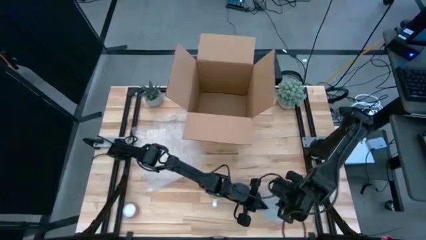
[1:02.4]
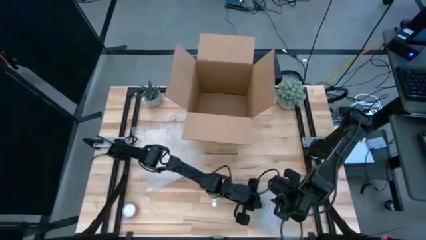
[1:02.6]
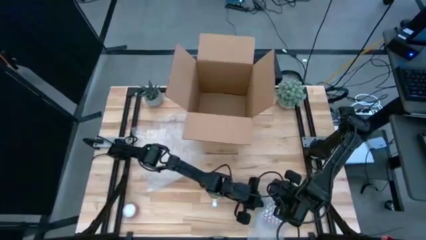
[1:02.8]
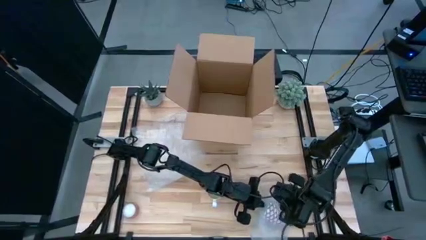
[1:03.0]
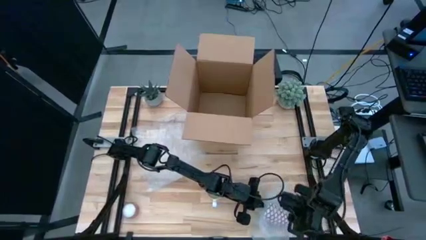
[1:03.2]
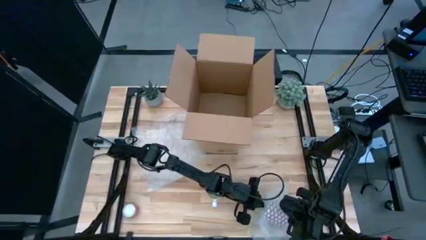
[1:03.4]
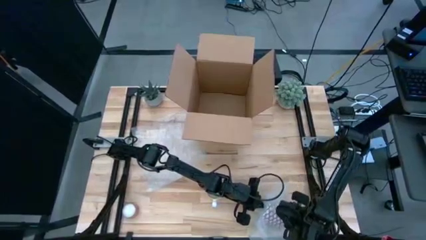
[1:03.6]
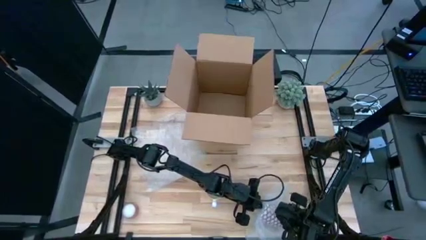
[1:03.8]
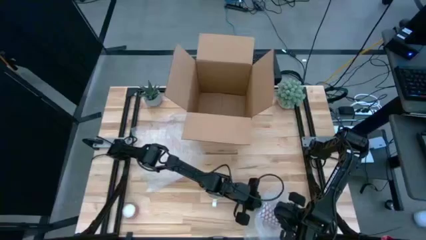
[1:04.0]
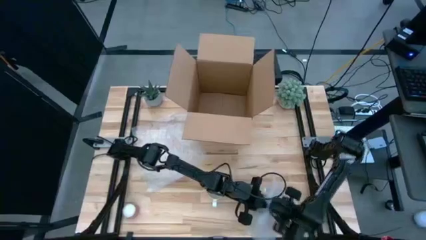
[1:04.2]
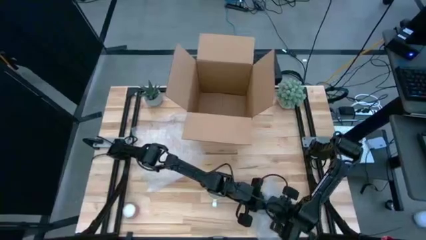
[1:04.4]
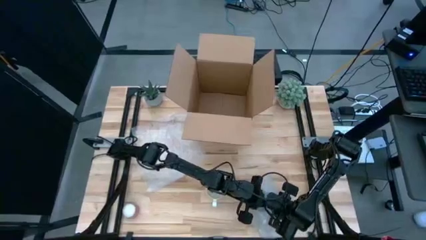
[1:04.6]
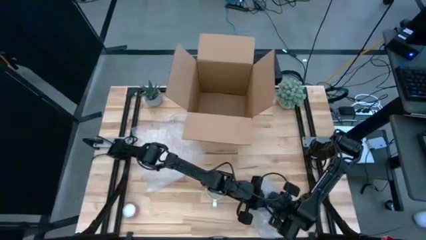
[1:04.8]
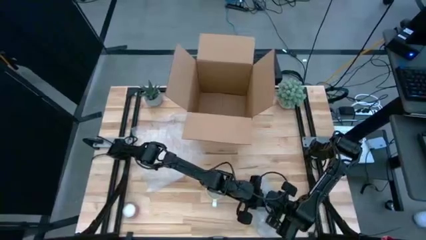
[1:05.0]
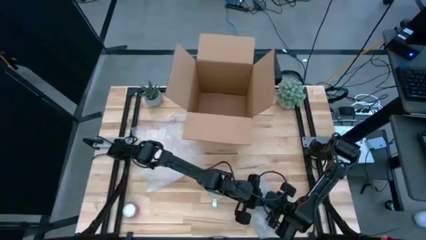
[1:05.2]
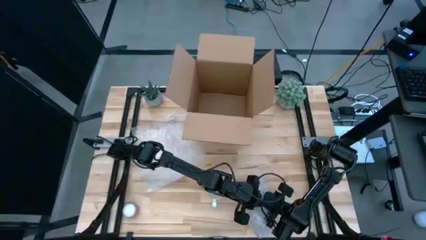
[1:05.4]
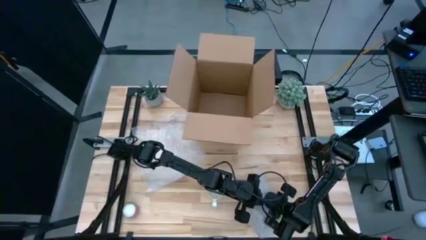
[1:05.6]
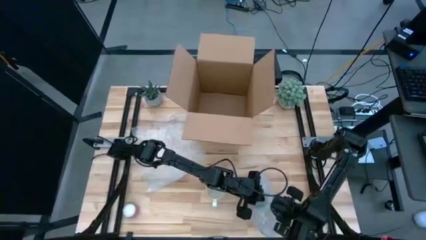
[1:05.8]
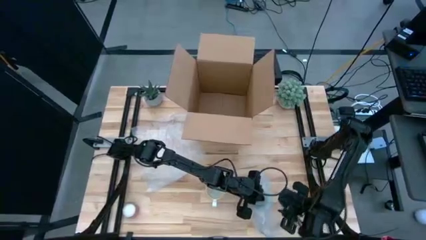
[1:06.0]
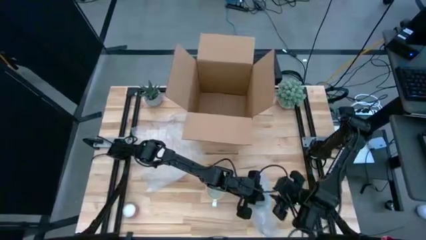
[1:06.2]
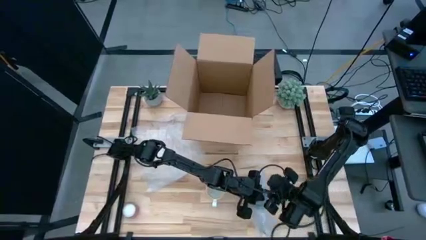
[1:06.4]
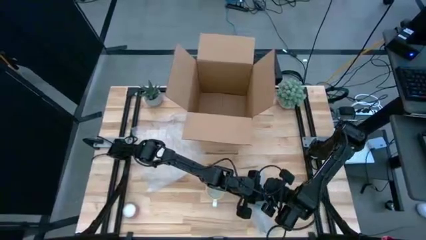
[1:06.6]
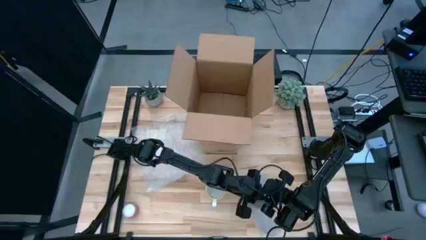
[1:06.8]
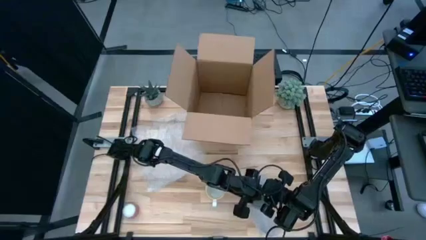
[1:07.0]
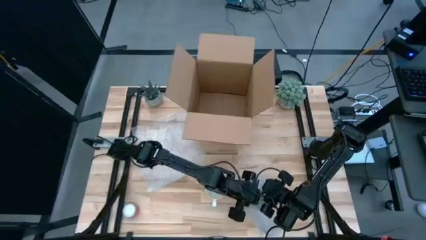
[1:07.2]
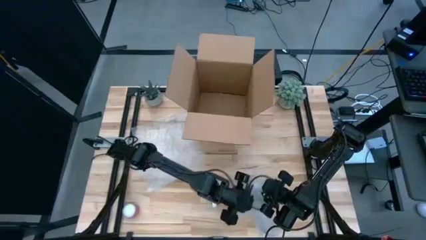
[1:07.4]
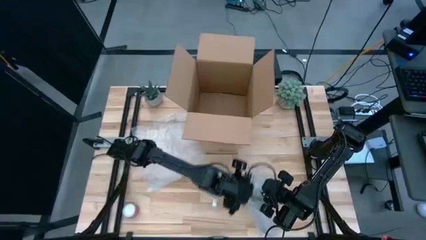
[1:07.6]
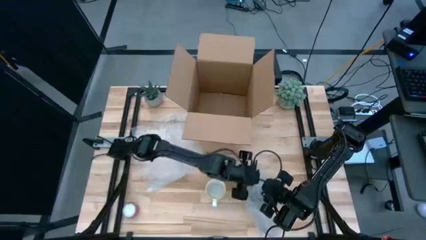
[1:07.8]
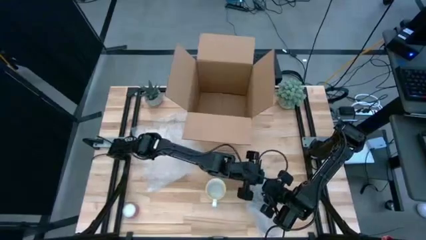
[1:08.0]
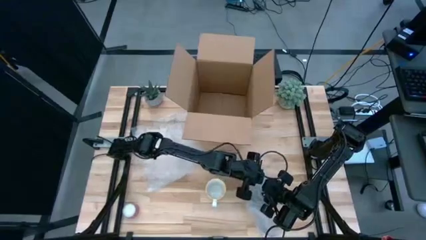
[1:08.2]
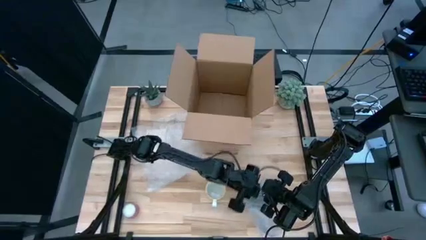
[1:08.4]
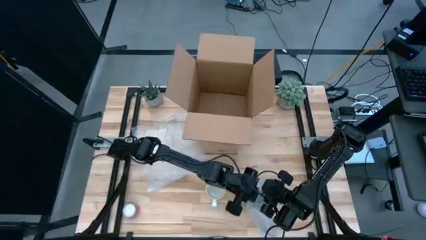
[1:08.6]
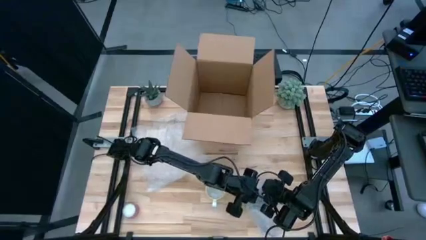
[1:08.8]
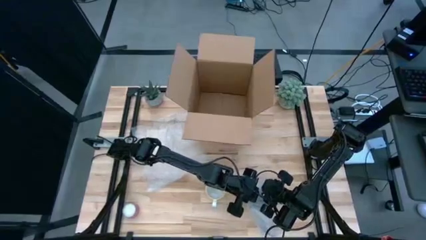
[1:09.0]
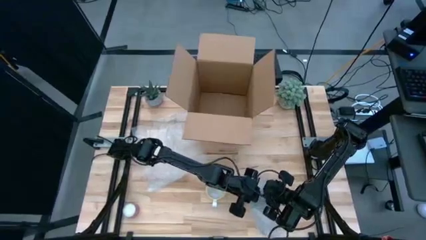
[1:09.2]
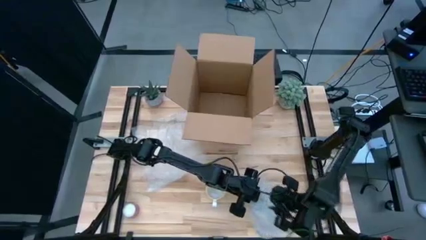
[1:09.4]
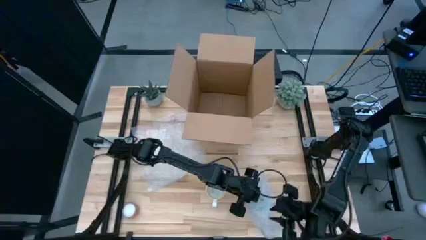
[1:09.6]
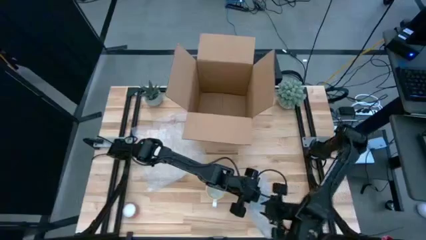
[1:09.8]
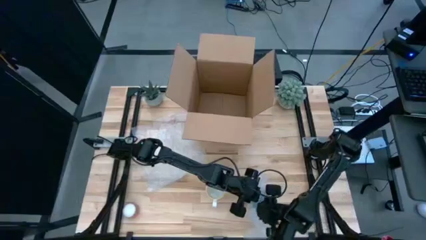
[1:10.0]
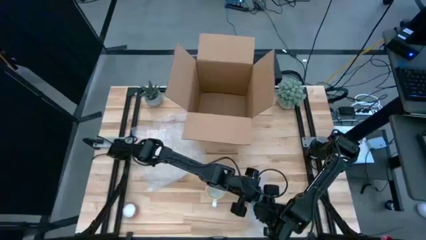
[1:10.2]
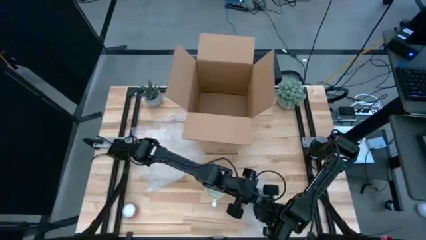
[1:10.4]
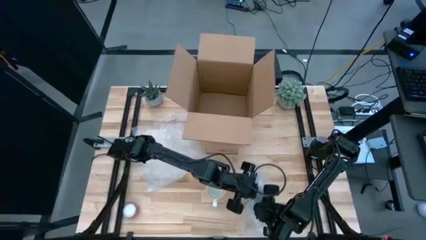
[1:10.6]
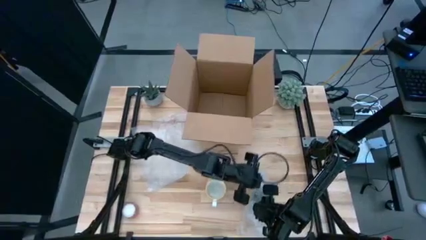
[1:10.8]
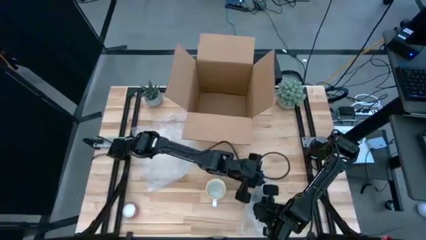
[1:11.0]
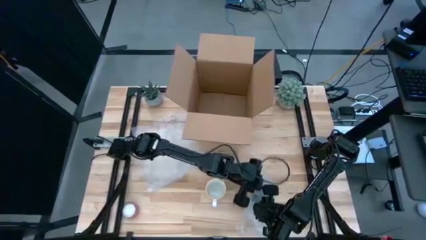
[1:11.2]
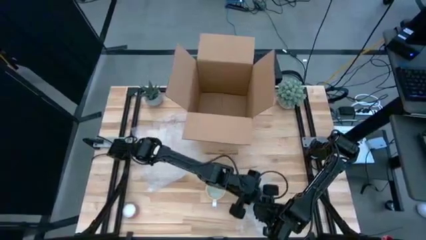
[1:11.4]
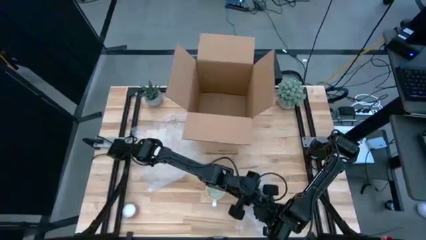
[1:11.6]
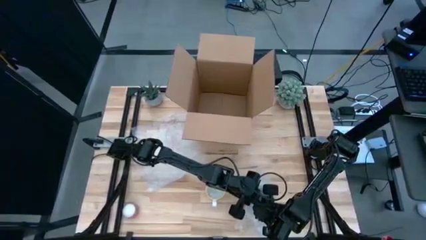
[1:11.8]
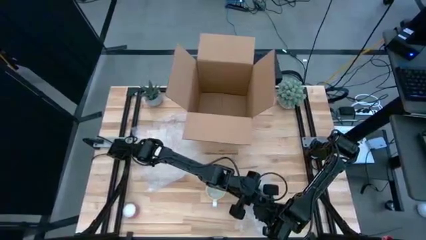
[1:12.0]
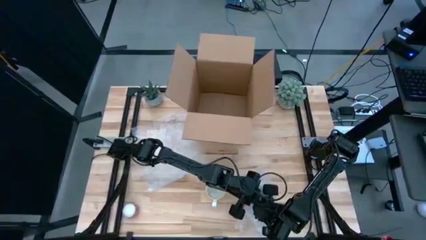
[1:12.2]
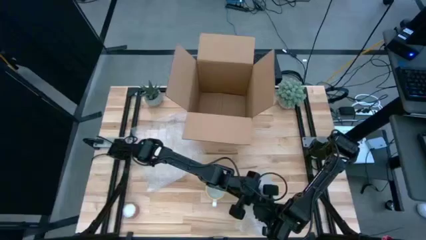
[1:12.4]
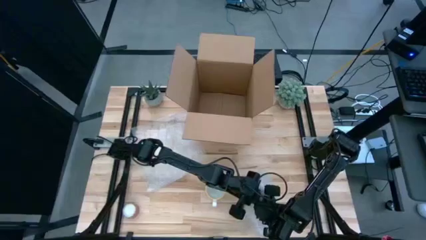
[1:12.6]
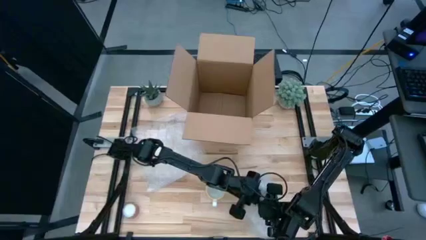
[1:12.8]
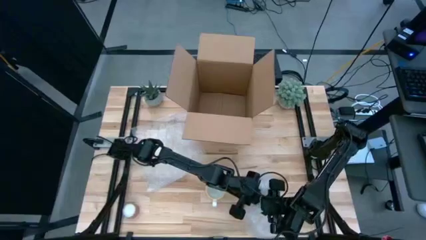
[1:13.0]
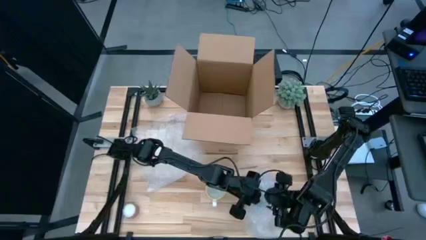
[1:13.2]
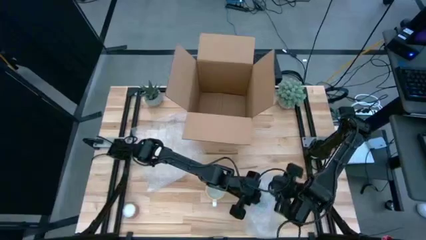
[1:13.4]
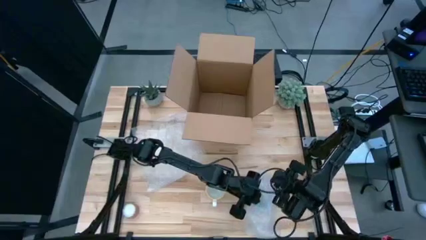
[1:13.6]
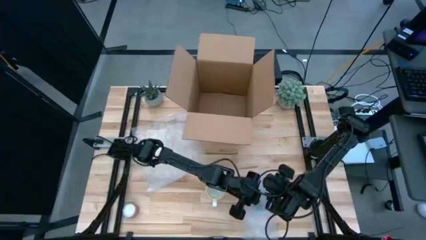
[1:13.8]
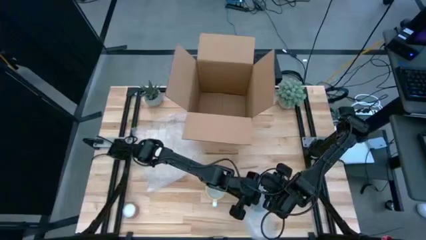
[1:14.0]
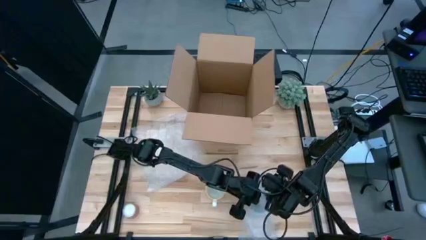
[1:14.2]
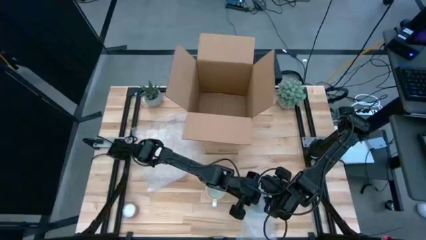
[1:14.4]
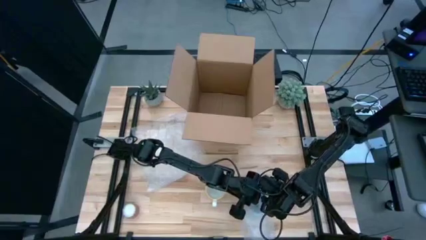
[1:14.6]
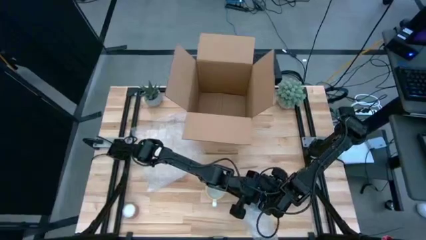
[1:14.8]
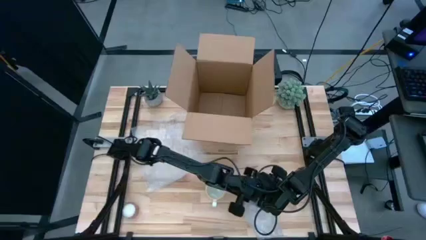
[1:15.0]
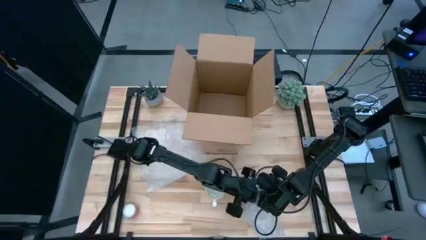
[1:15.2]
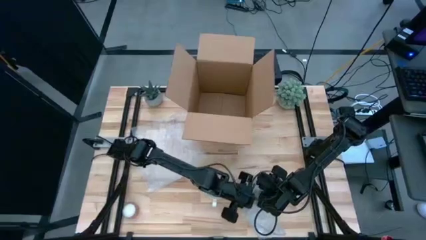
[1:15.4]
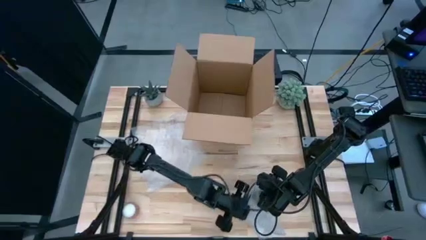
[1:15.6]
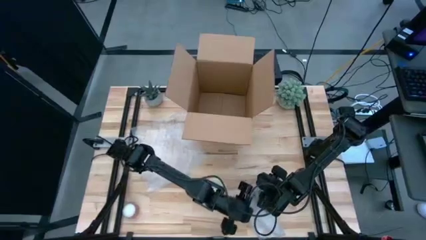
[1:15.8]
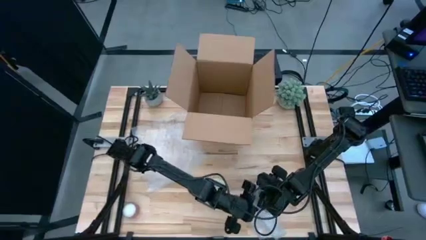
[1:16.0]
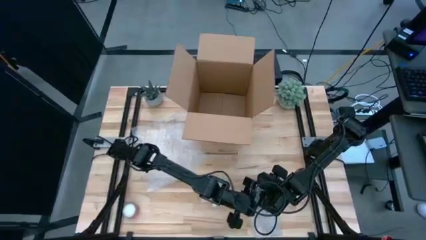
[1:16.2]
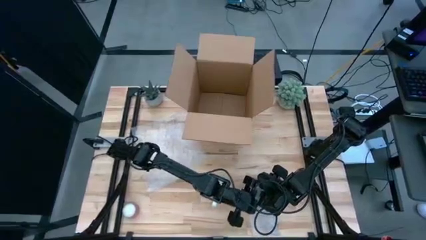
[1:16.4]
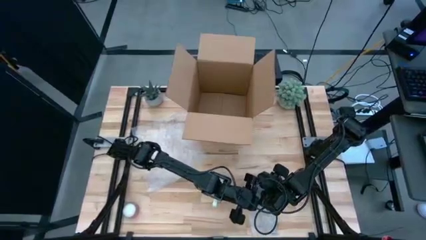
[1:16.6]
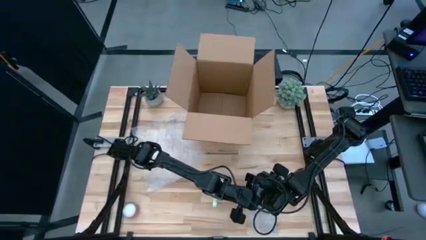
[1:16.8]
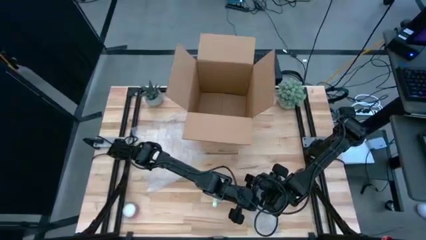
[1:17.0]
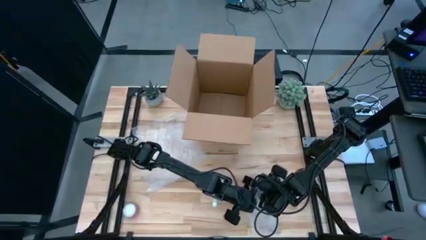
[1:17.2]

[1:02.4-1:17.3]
Task: wrap mug
Wrap the red cup with the bubble wrap

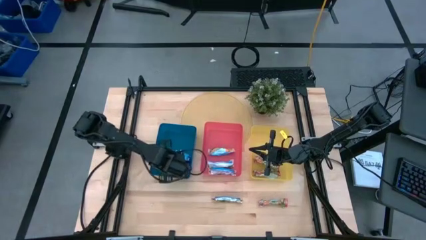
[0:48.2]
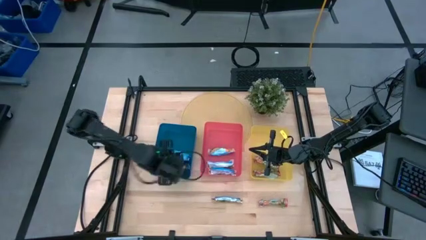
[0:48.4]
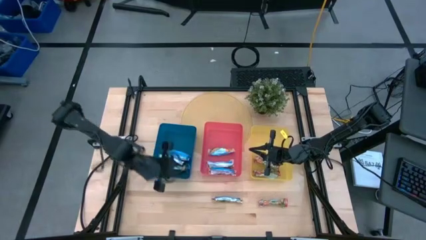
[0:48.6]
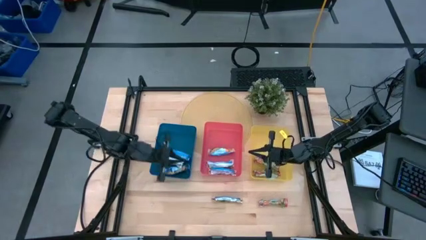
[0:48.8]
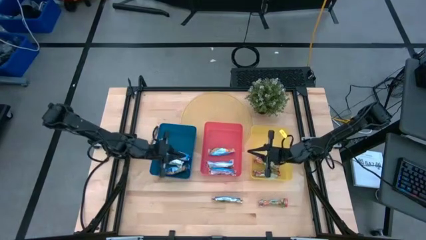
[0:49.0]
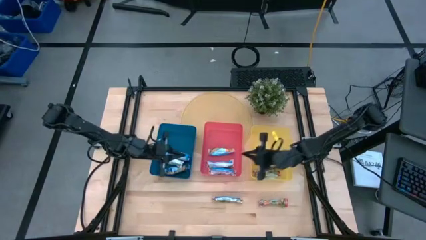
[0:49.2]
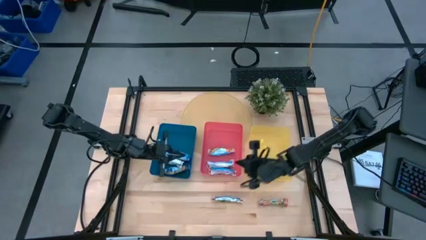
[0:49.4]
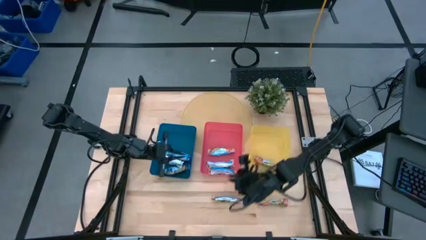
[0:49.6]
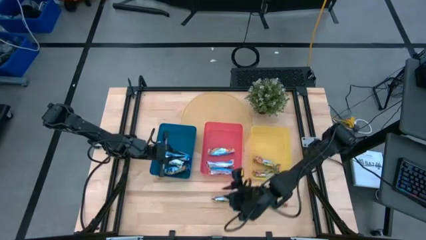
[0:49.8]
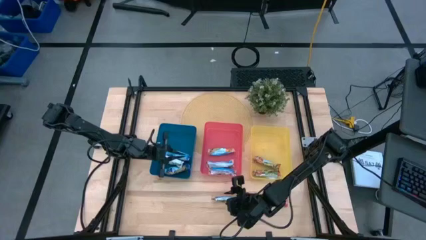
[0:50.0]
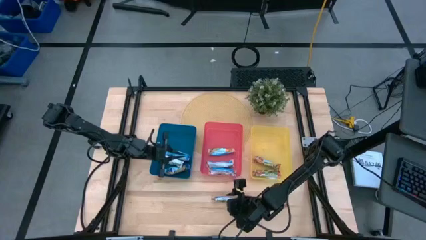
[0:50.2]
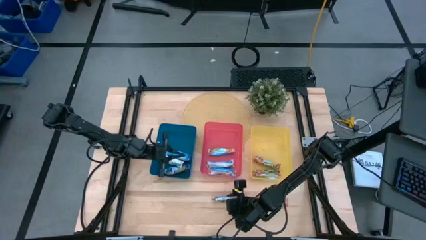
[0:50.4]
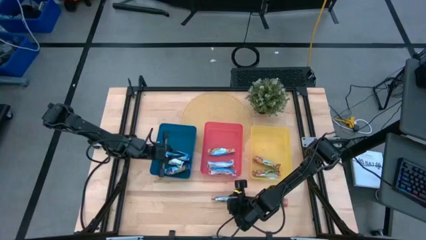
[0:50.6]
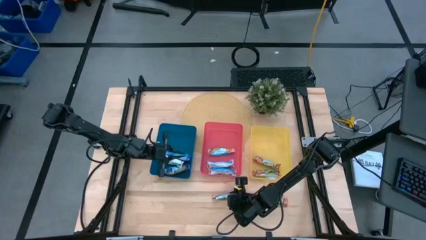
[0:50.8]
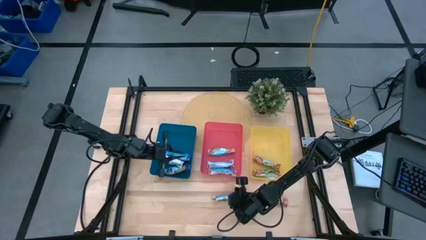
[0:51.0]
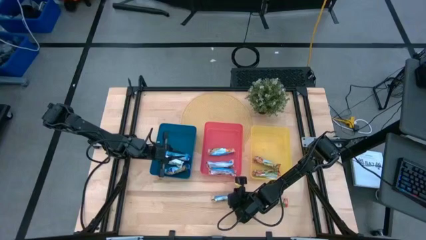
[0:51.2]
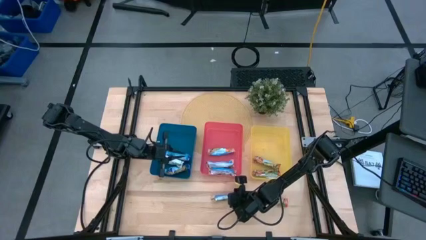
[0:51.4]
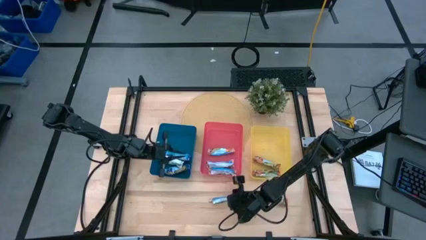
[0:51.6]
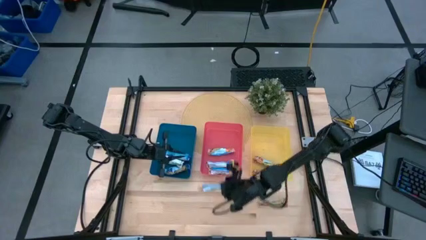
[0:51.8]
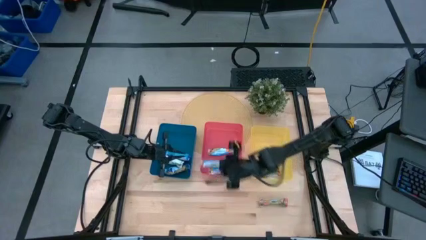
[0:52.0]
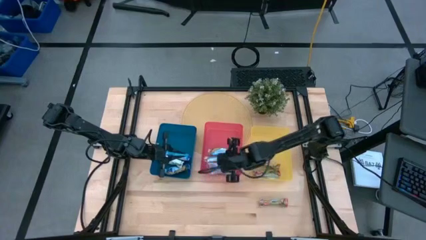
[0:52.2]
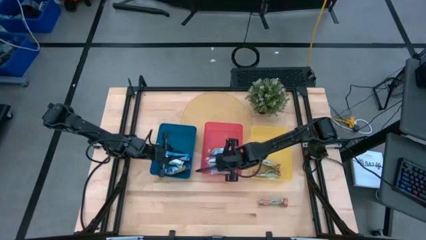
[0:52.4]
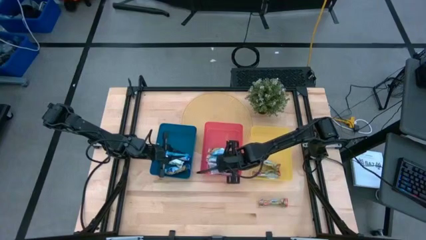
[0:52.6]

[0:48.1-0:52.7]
Task: Pick and place Granola Bars by type
Put the yellow granola bar into the red bin
